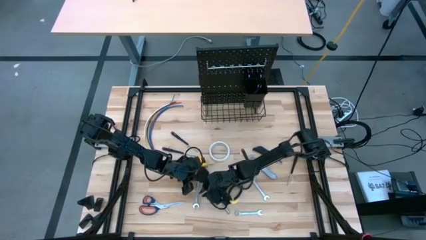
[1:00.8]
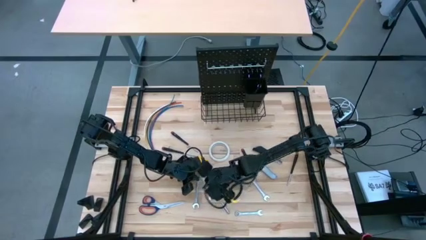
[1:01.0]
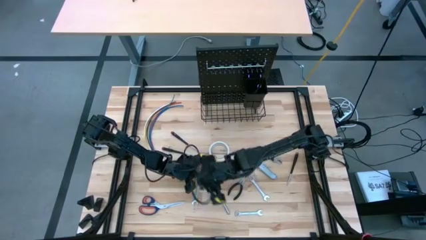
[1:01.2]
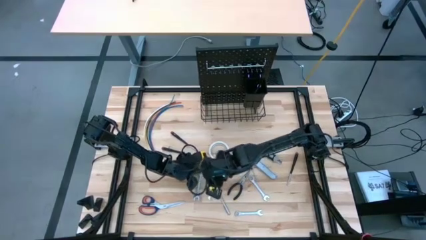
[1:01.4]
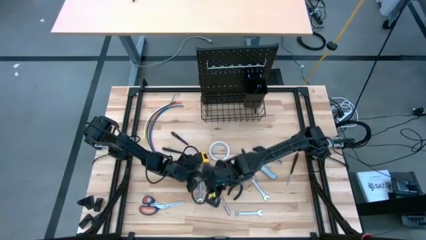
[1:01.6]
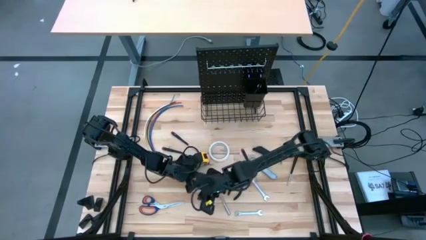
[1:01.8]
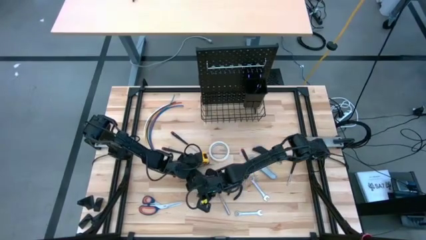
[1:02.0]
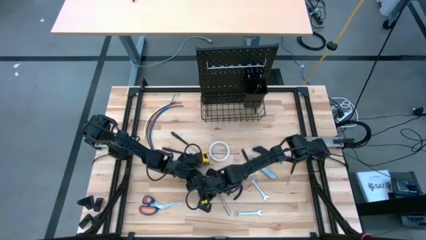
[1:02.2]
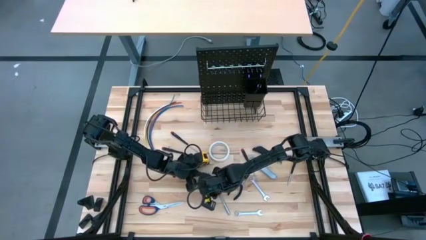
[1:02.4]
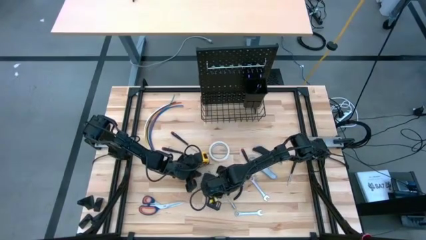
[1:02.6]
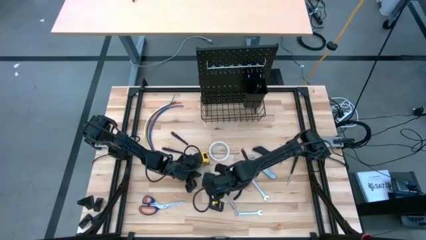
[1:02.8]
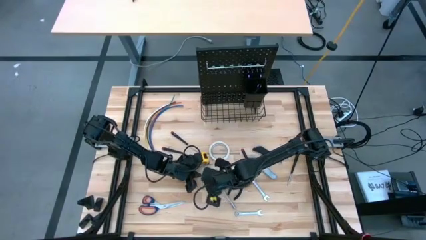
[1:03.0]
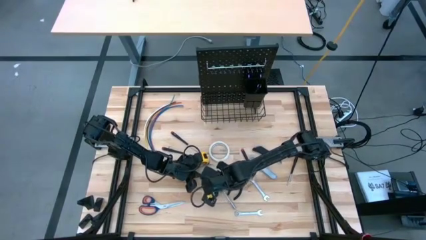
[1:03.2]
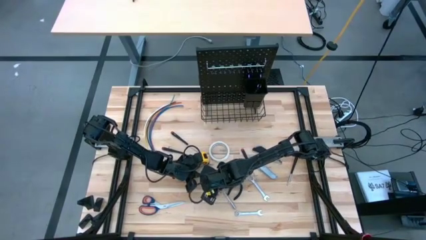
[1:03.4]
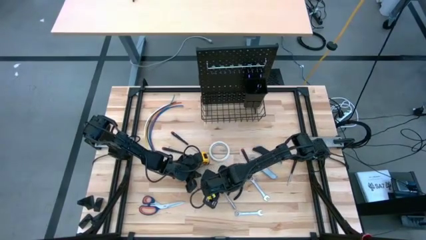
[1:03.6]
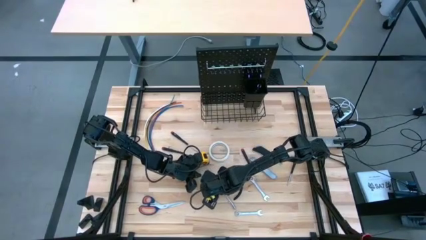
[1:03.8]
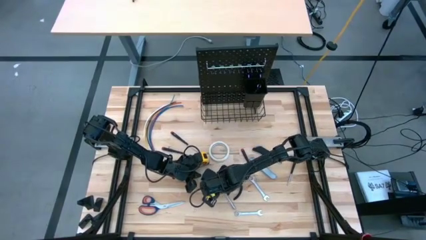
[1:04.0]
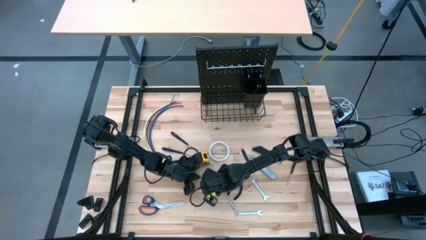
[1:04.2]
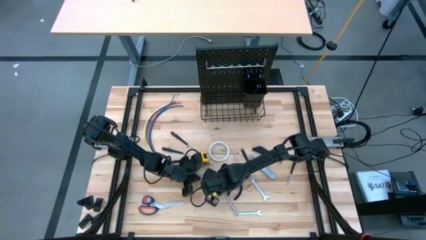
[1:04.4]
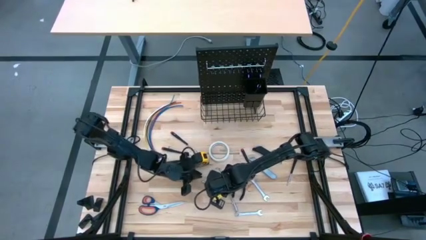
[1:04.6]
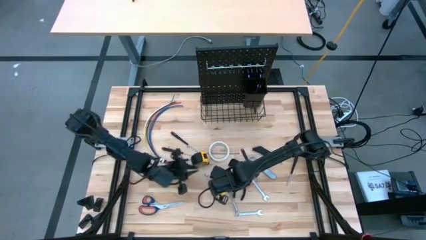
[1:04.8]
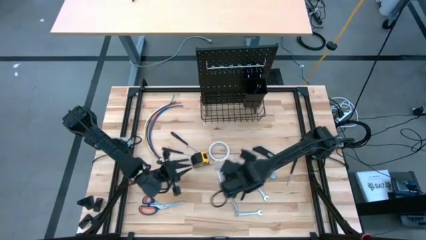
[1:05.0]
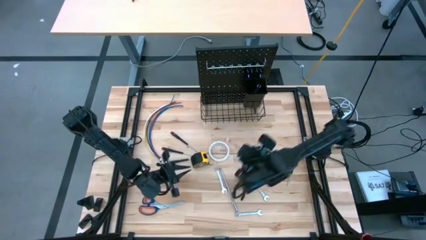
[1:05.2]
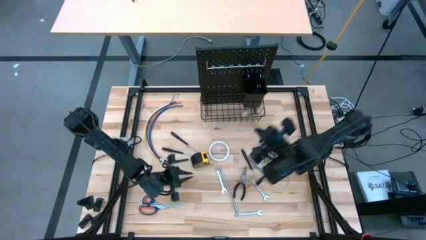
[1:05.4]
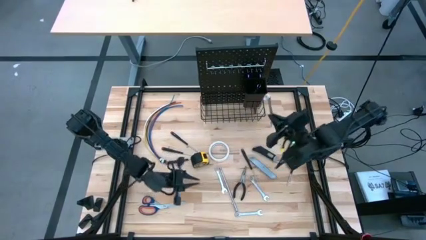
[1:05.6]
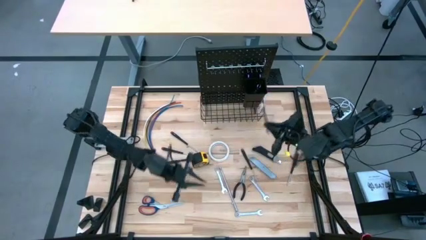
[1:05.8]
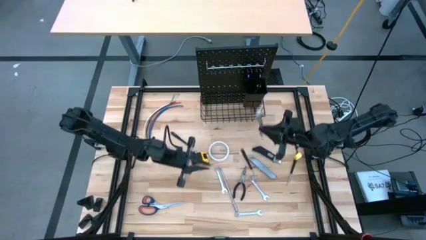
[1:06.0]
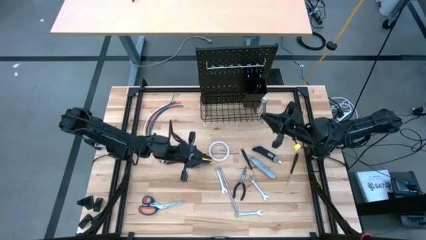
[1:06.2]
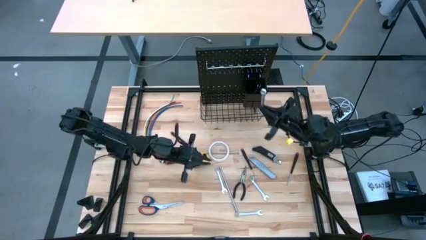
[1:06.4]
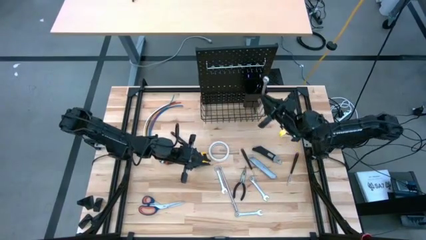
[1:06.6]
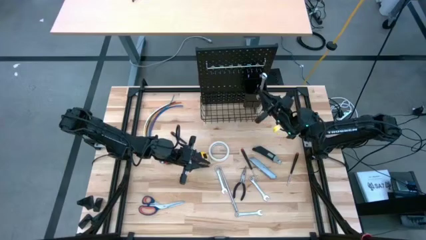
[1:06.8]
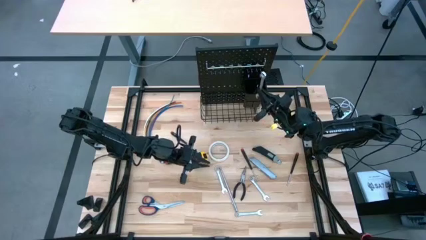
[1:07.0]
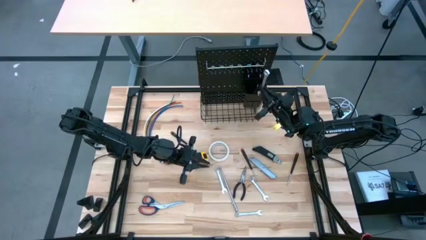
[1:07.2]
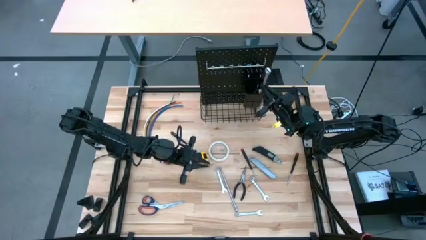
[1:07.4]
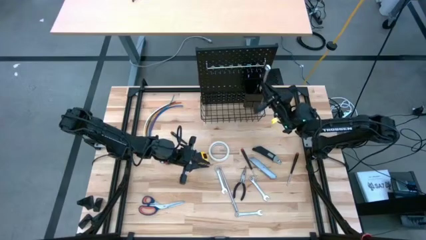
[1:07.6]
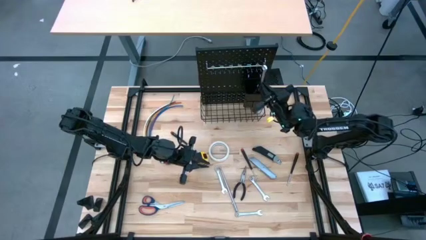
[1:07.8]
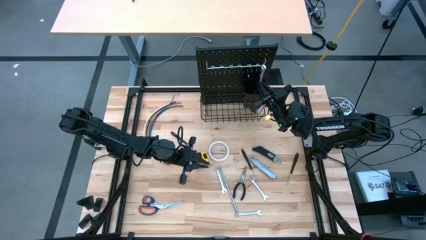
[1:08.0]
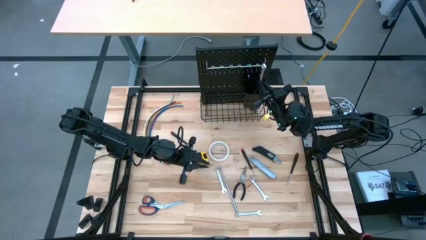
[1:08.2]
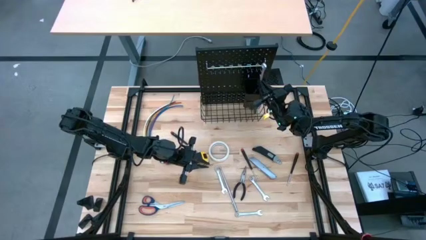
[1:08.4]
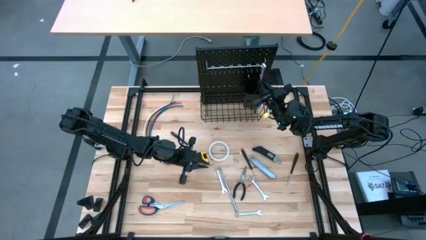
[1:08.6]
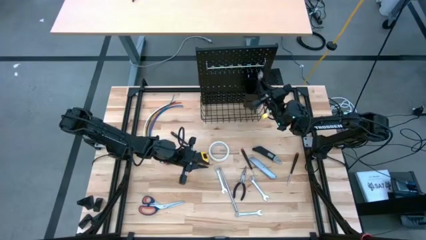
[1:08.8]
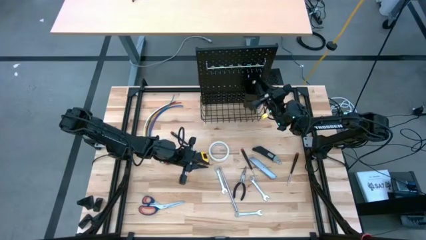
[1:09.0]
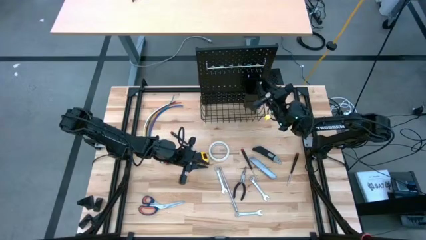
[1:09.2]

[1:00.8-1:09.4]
Task: Hang tools onto peg board
Put the wrench into the black bin on the peg board

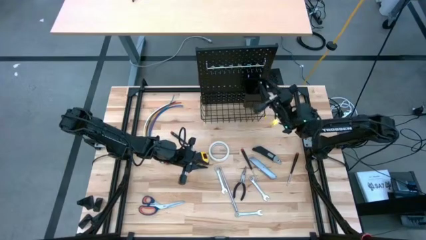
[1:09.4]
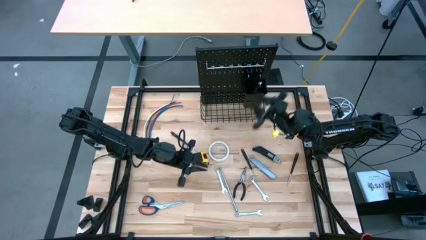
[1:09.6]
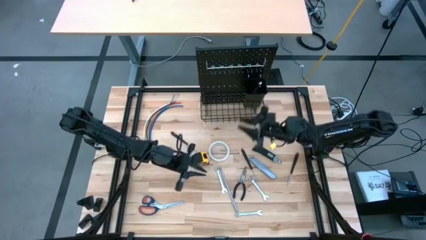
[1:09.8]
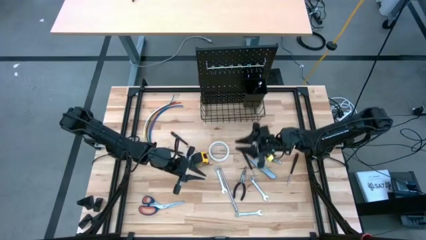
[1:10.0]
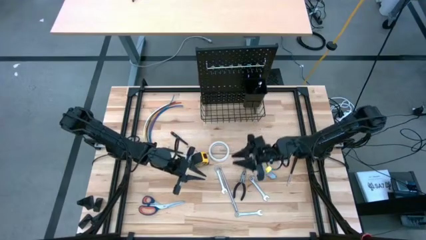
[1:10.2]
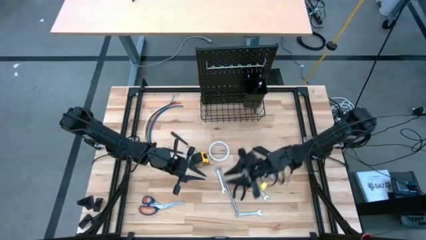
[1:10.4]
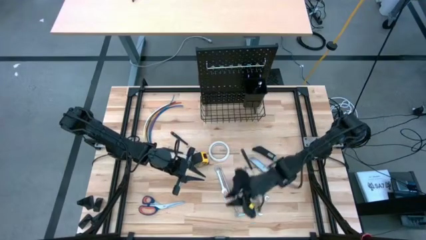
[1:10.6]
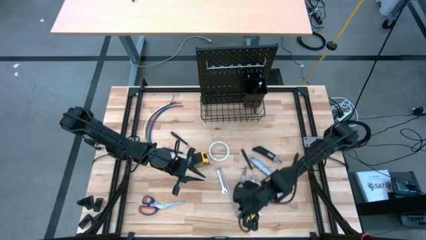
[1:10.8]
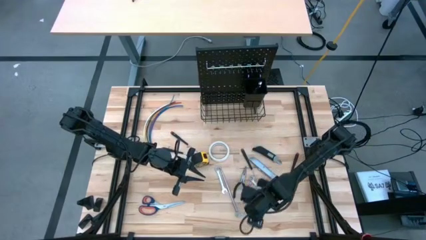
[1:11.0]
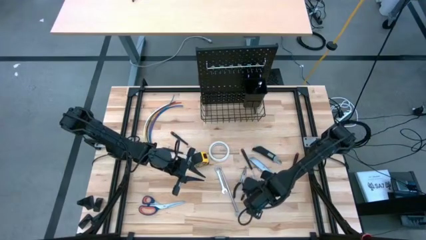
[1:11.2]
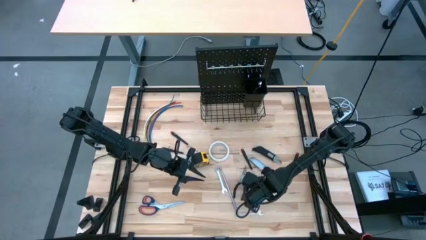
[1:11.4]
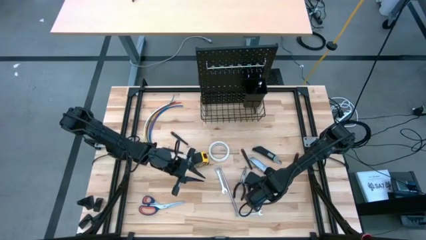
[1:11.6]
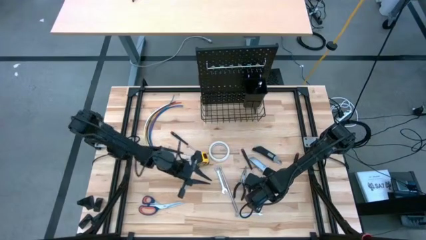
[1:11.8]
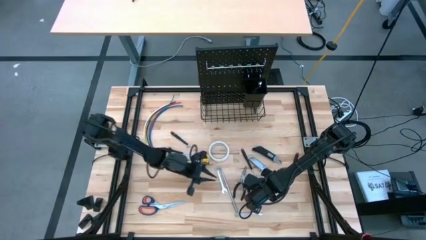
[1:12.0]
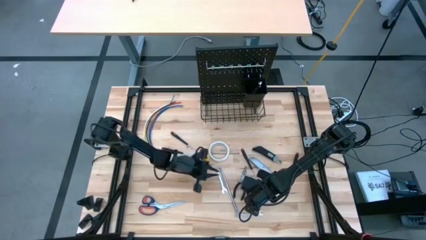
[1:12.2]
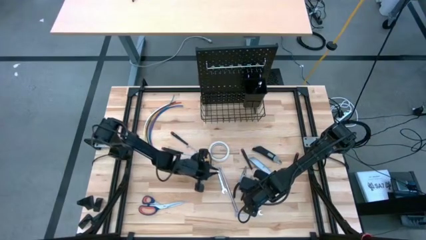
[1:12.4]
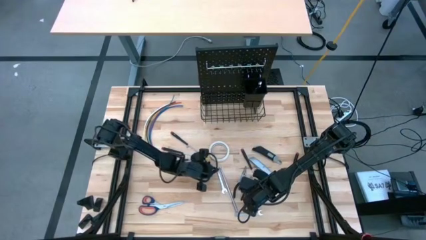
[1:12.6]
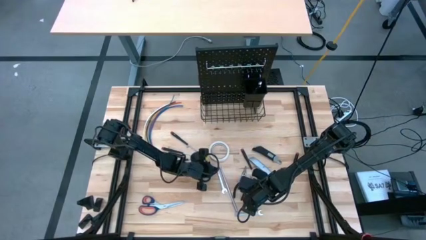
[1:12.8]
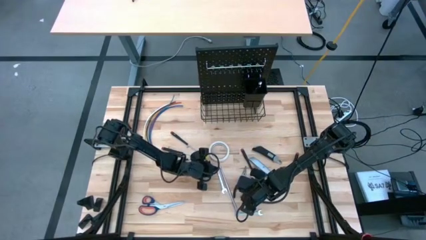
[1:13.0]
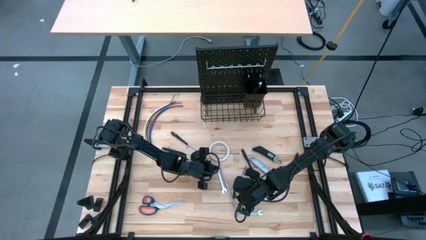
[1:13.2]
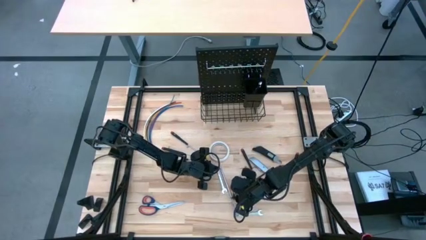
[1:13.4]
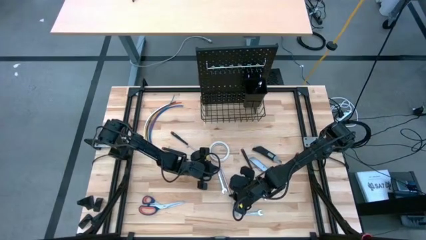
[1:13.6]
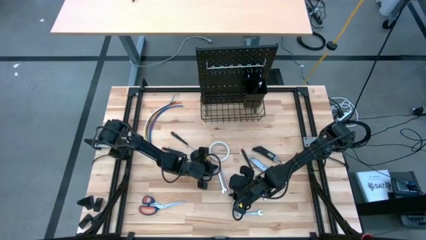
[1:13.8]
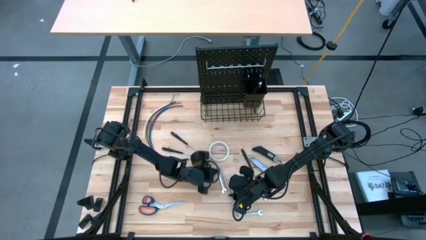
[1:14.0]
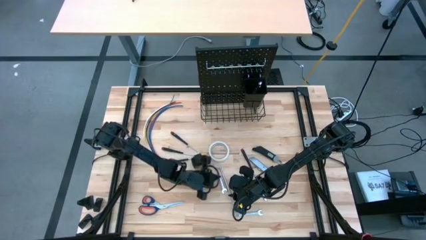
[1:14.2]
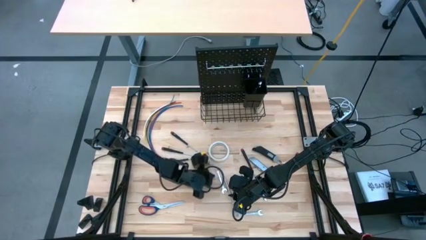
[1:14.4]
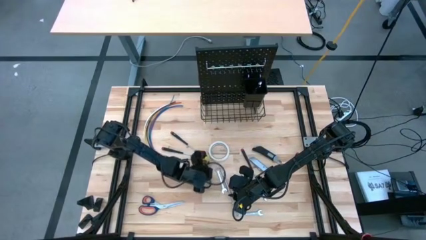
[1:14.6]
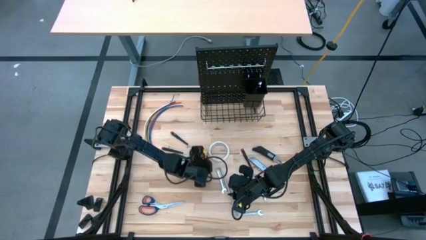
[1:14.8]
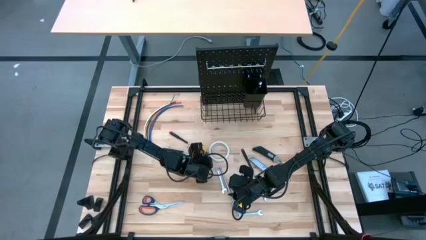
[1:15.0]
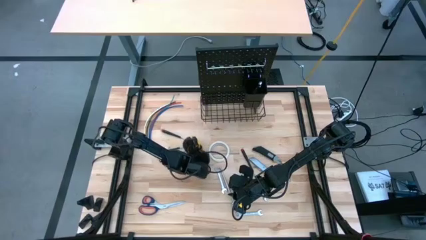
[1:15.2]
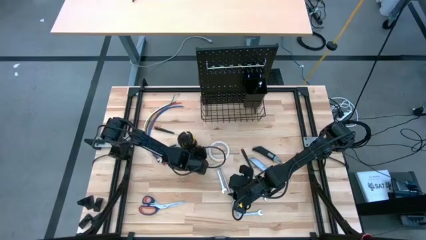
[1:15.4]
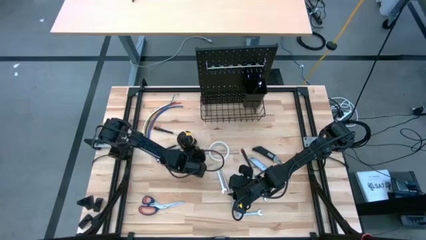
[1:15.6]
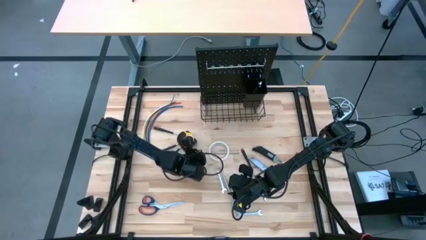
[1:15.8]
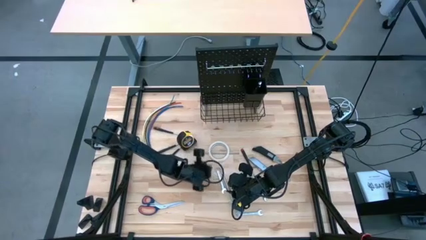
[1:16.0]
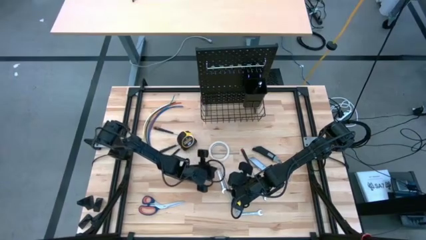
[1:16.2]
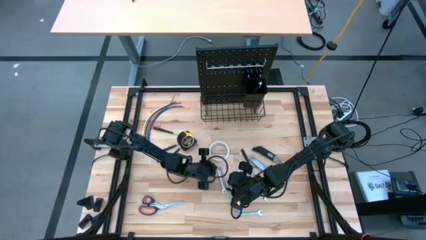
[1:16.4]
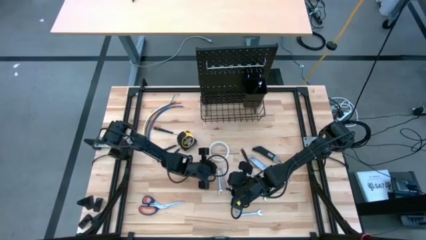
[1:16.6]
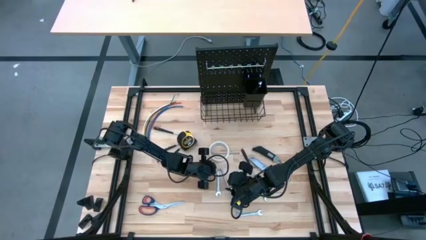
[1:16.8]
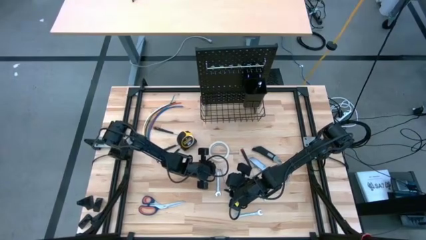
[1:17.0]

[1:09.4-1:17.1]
Put the wrench into the black bin on the peg board
